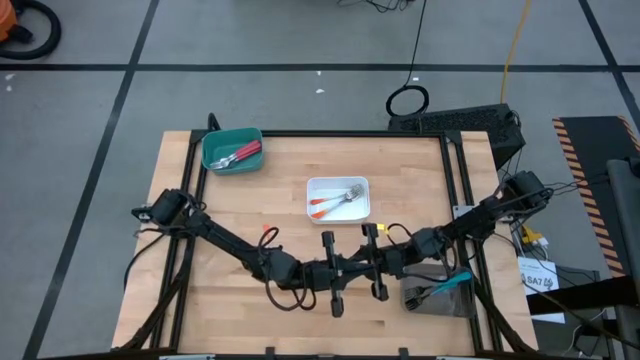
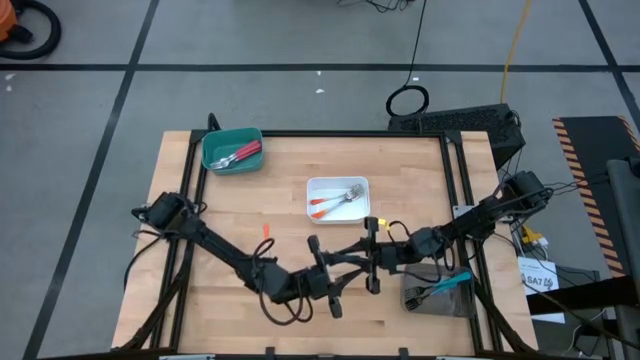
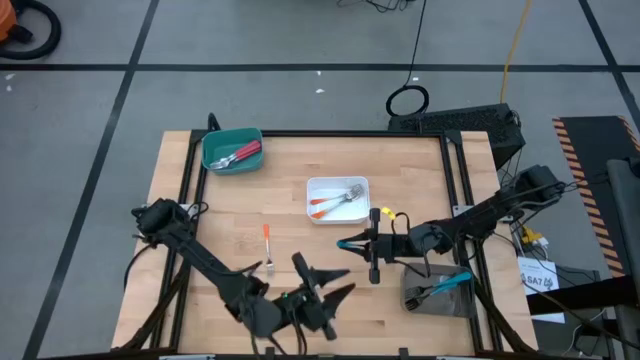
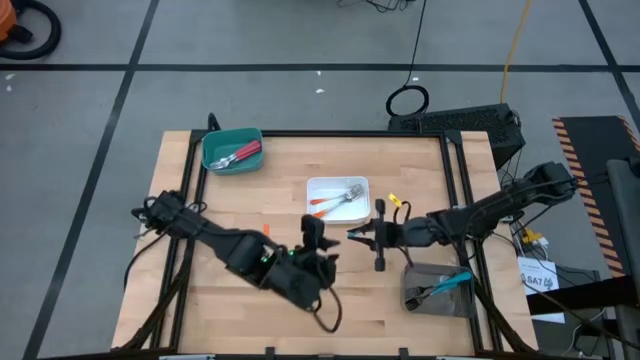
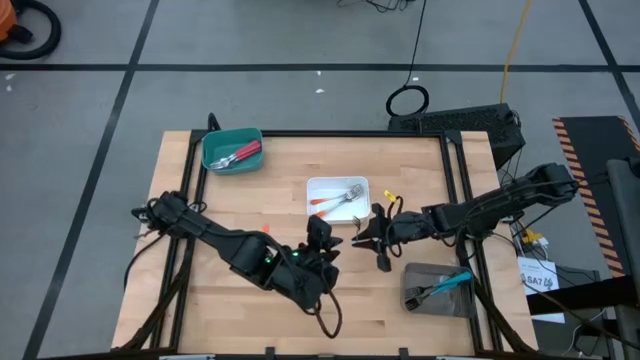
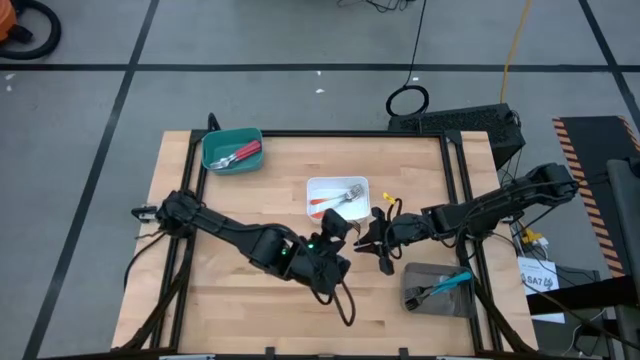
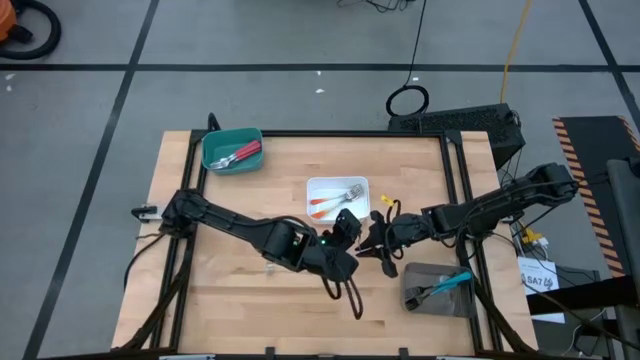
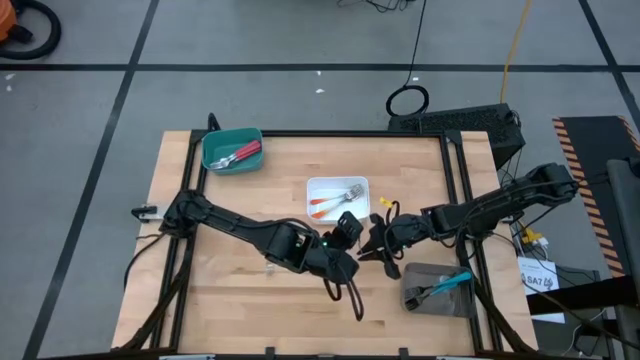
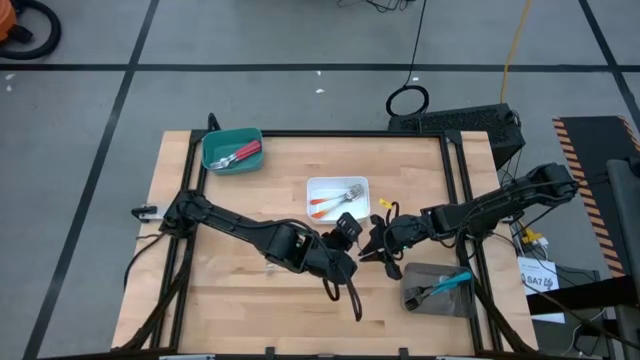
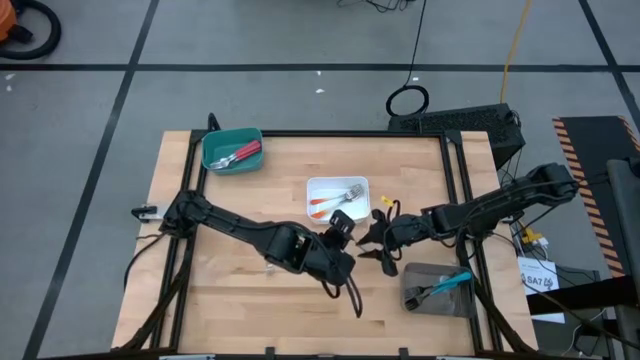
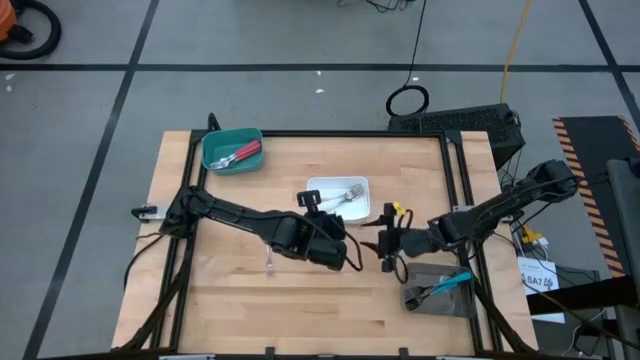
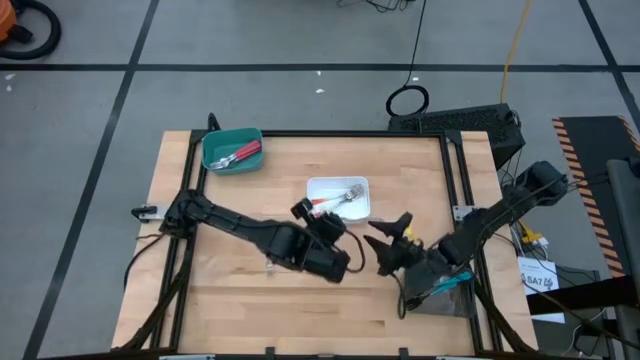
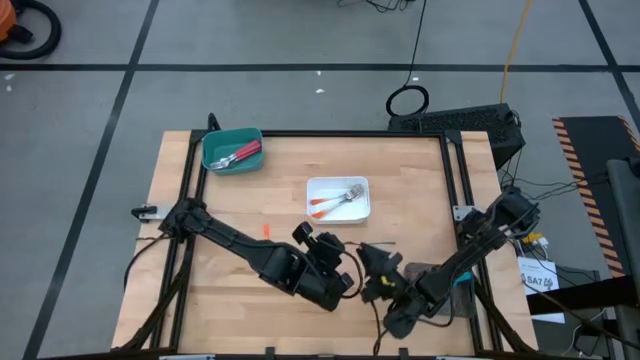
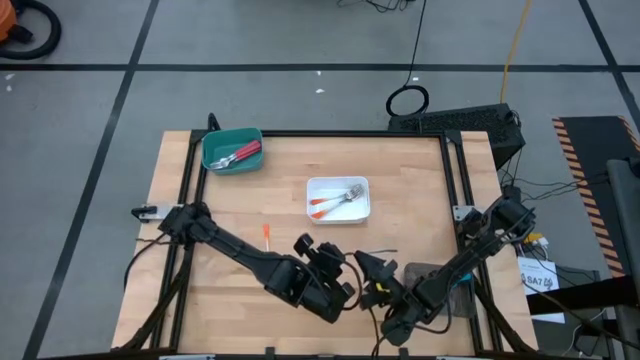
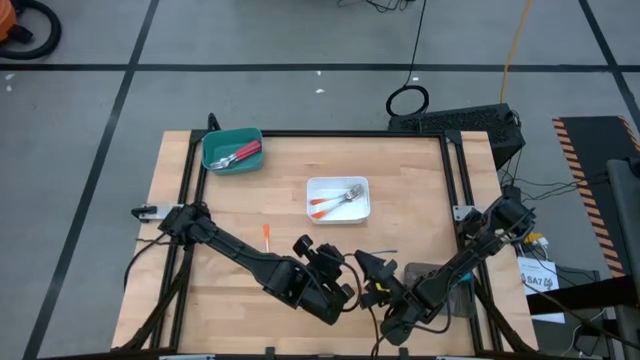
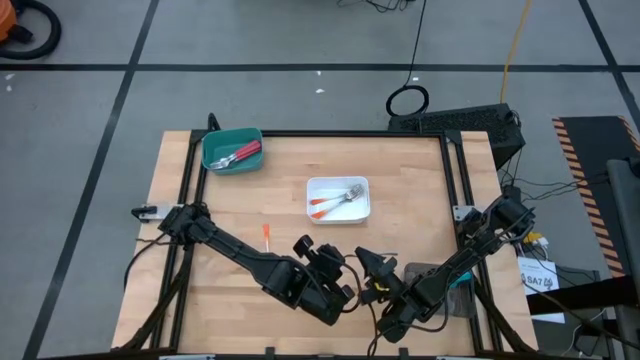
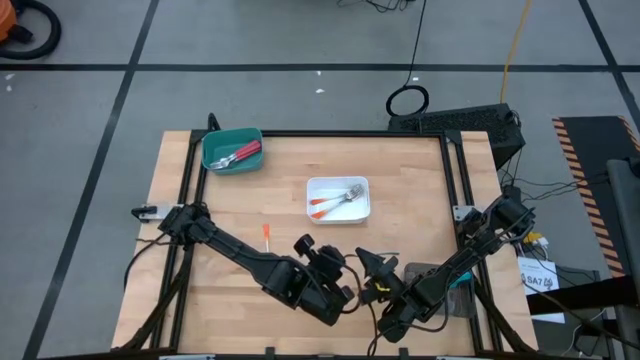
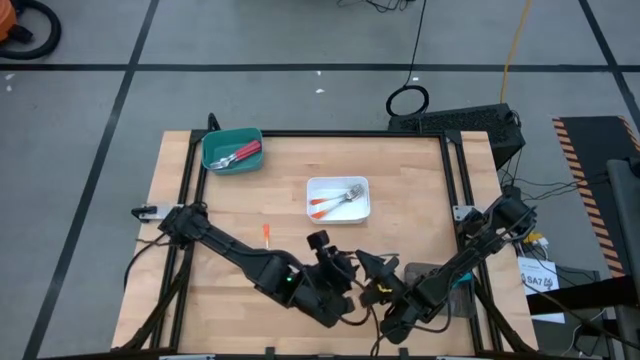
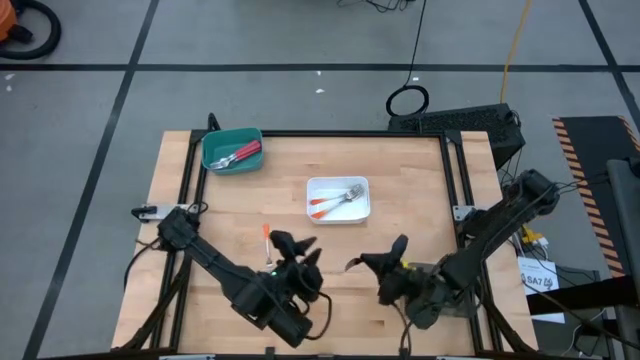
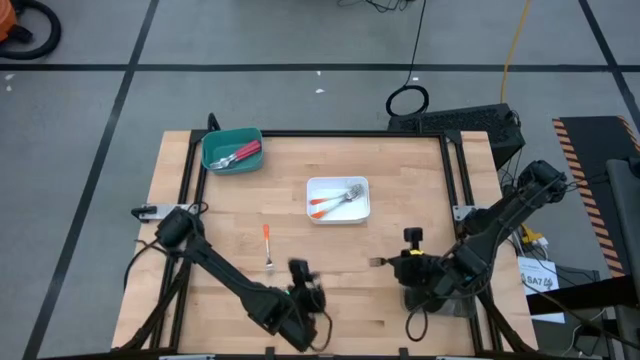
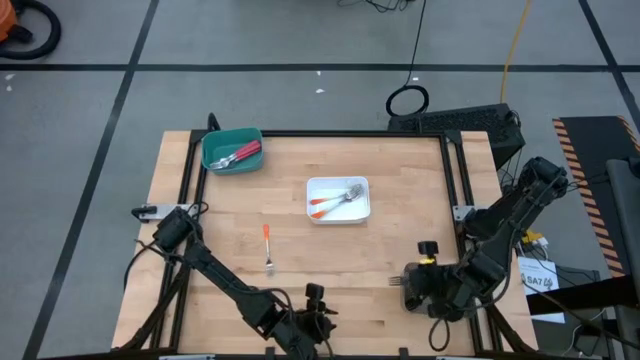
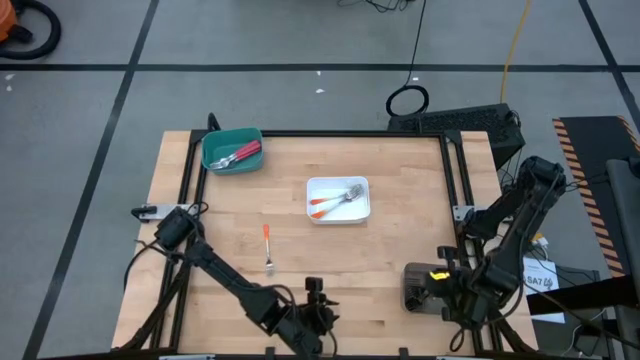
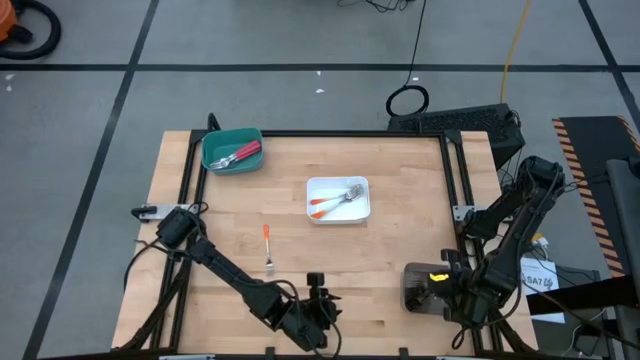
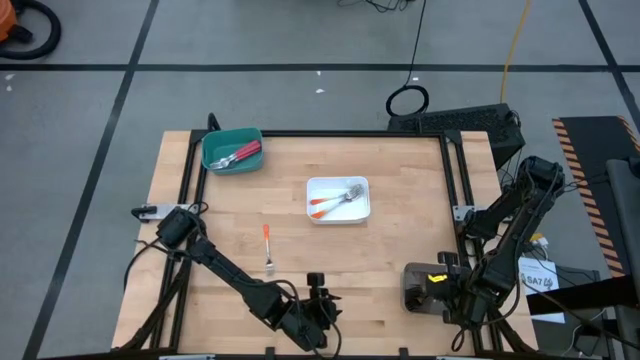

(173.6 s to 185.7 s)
Task: Sort silverware by color (type)
Put the blue fork into the black bin

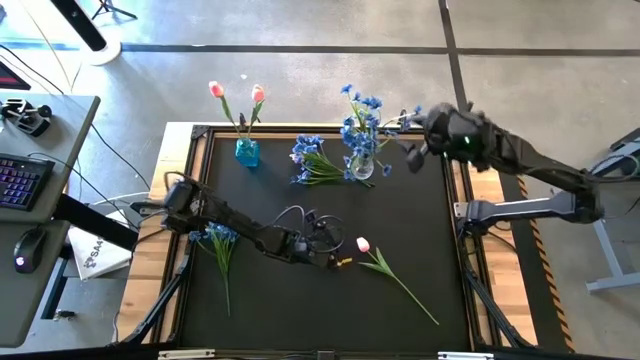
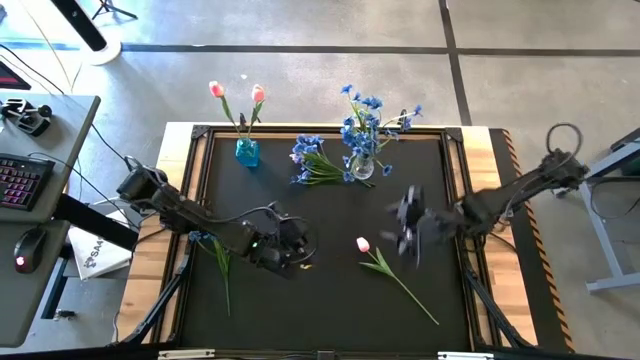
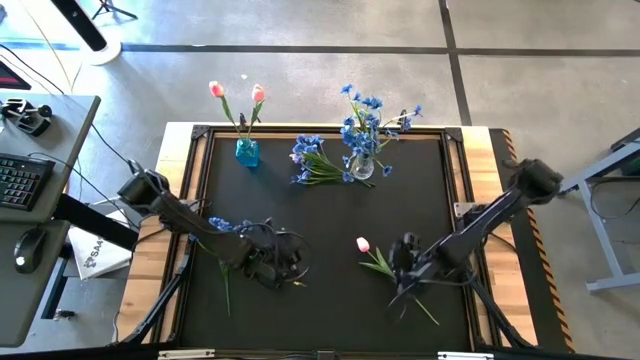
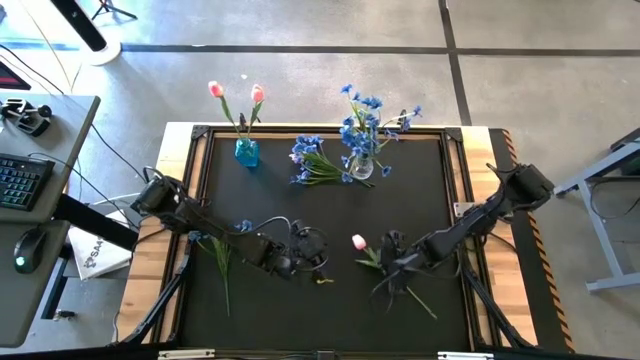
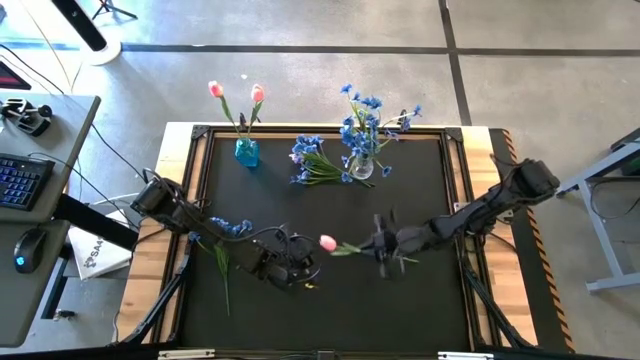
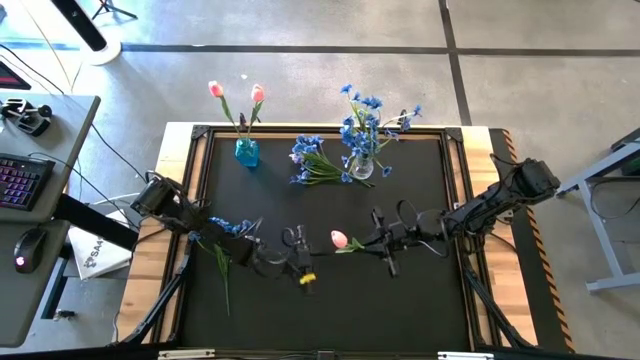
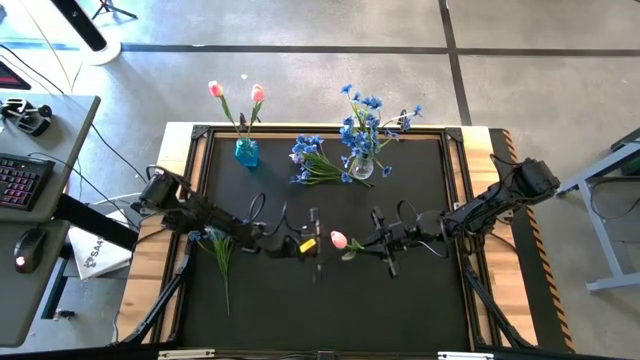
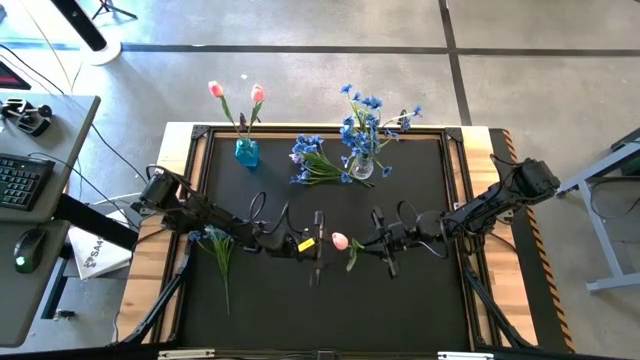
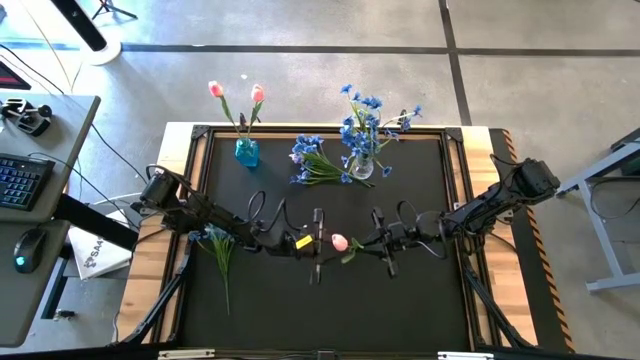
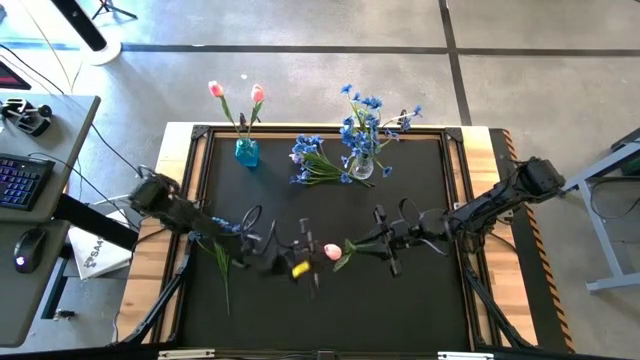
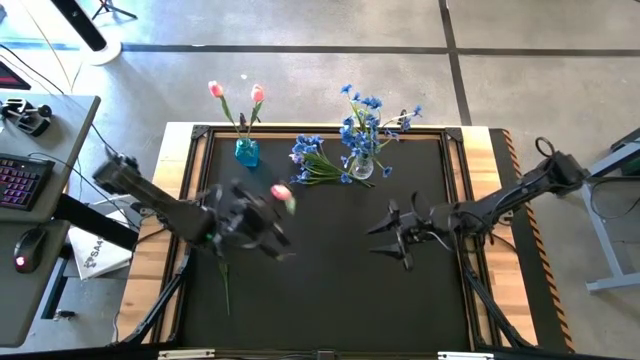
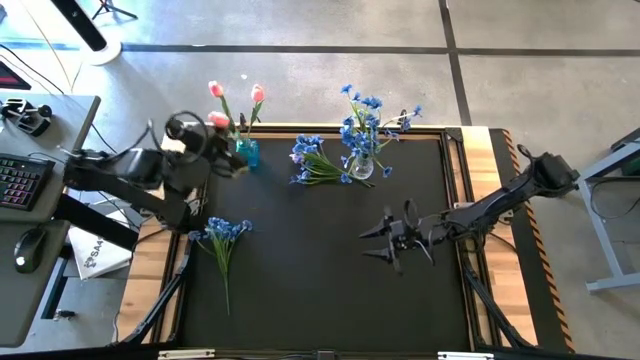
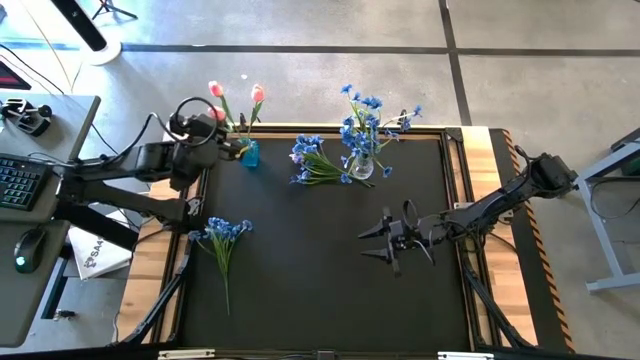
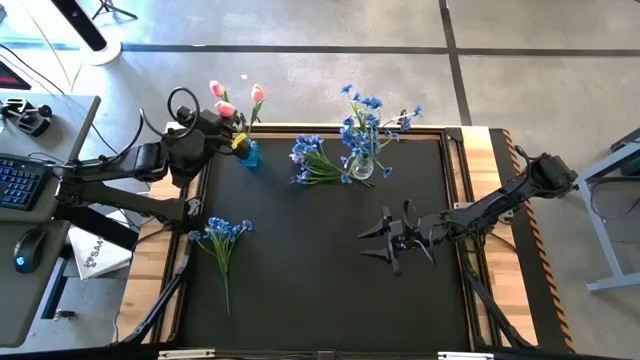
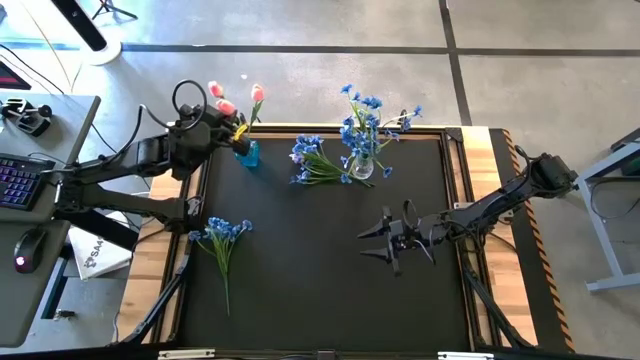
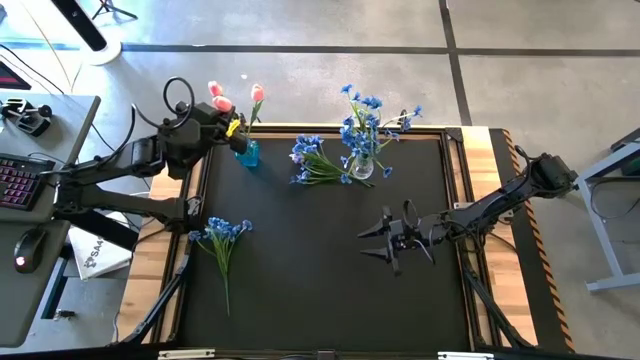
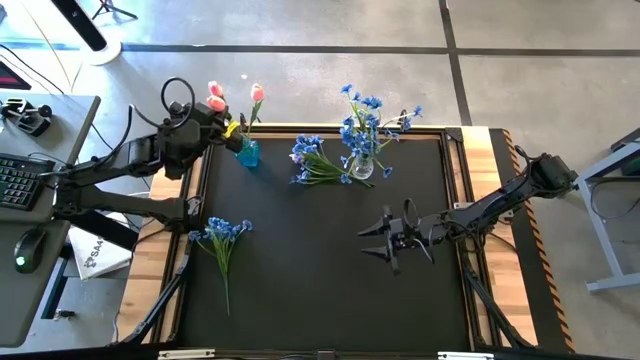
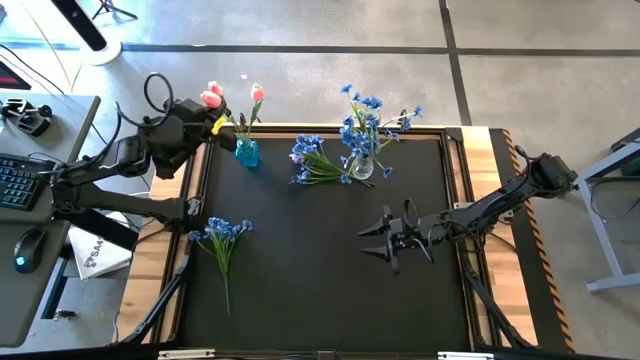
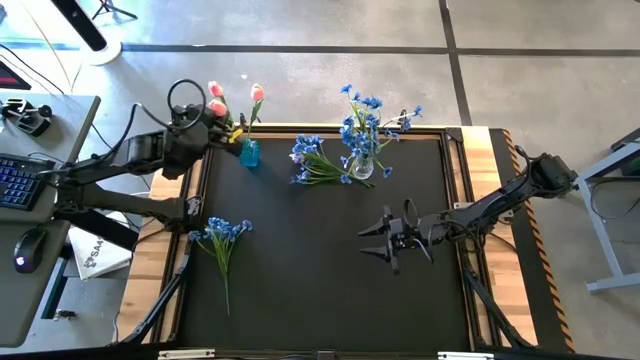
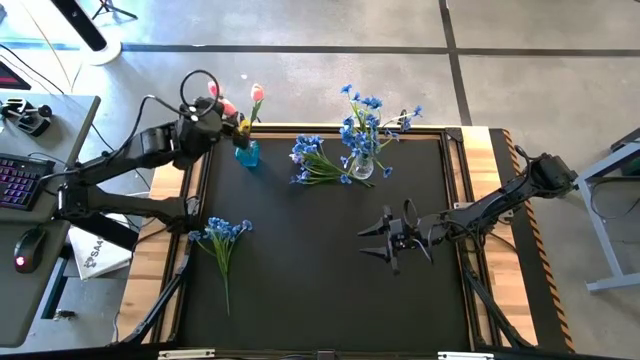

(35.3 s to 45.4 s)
Task: Sort flowers into vase by color
Put the pink tulip flower into the blue flower vase
